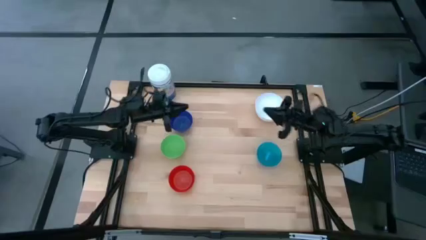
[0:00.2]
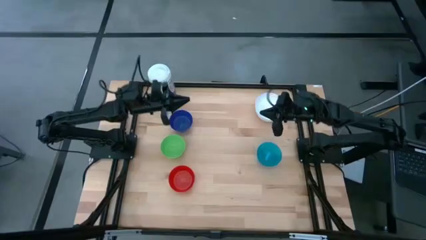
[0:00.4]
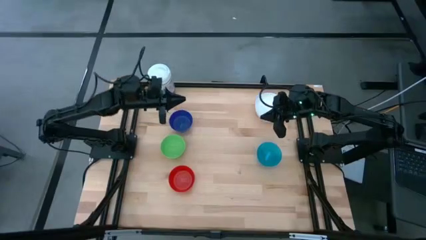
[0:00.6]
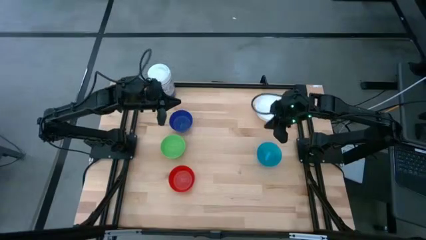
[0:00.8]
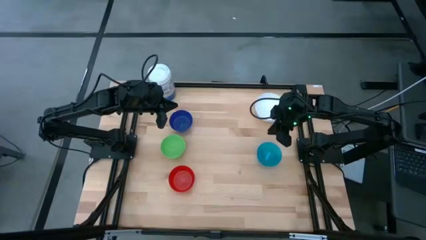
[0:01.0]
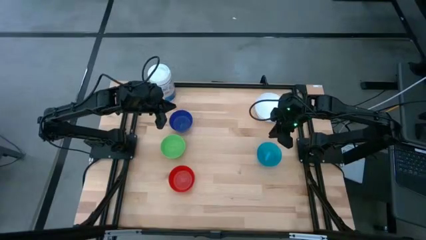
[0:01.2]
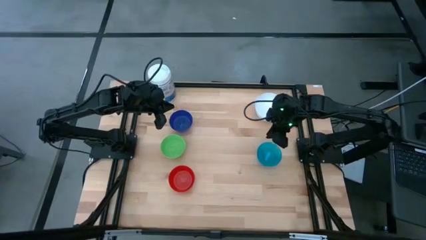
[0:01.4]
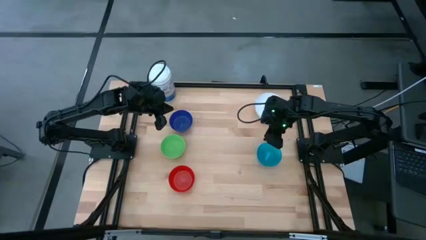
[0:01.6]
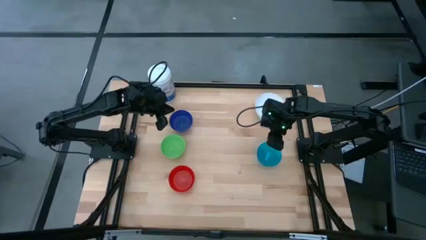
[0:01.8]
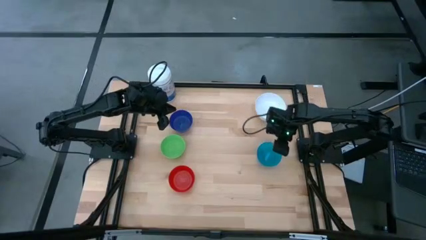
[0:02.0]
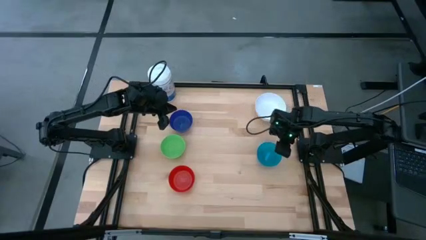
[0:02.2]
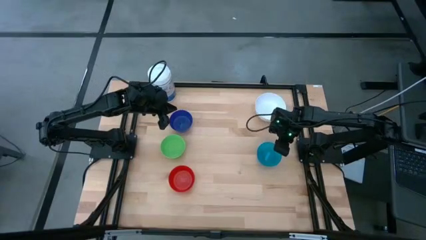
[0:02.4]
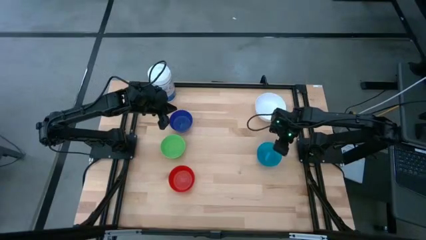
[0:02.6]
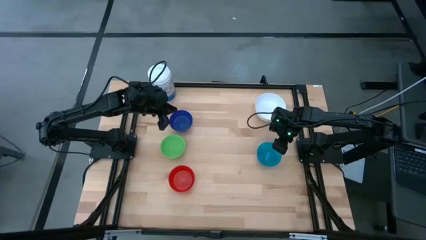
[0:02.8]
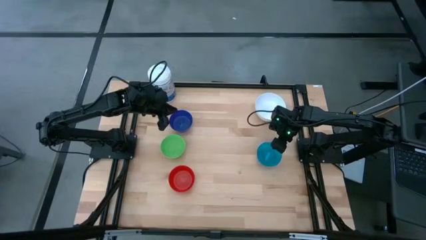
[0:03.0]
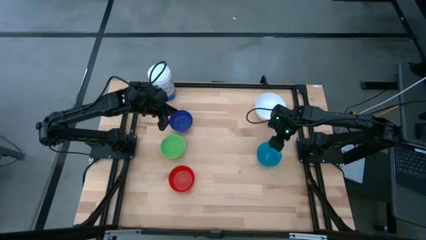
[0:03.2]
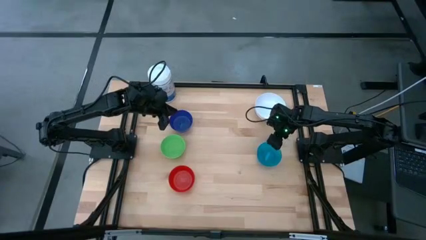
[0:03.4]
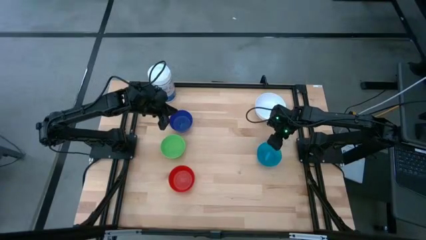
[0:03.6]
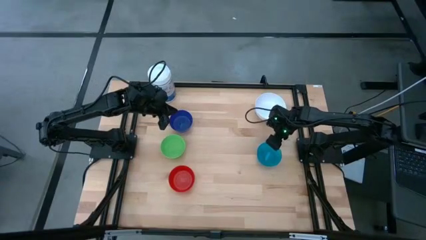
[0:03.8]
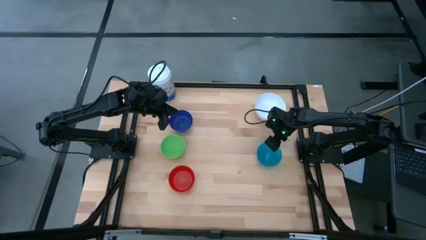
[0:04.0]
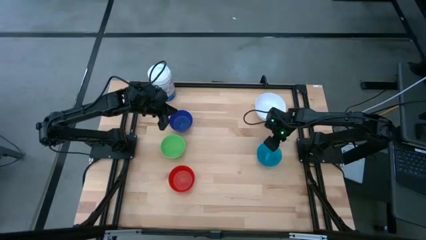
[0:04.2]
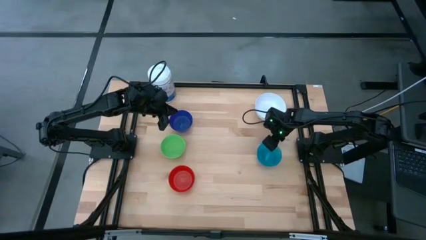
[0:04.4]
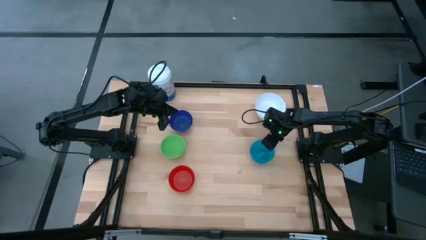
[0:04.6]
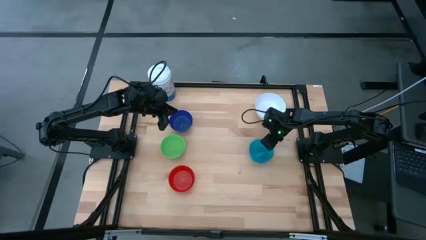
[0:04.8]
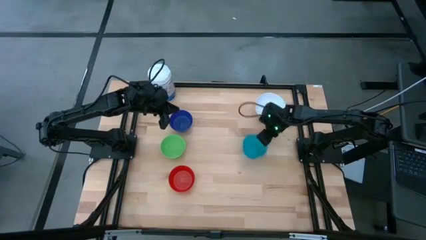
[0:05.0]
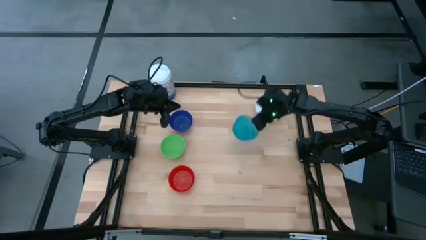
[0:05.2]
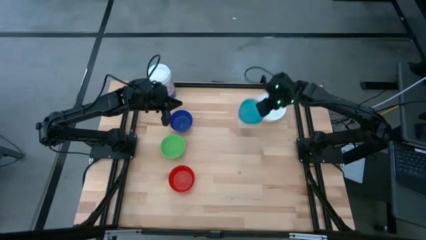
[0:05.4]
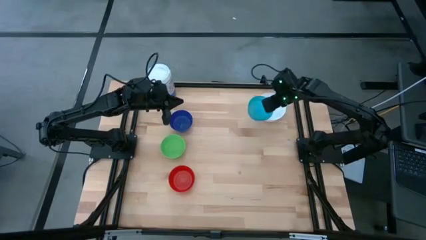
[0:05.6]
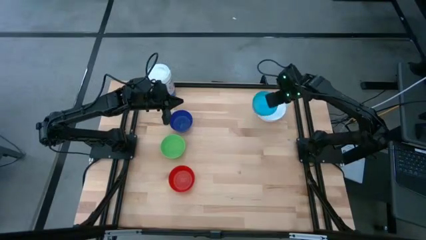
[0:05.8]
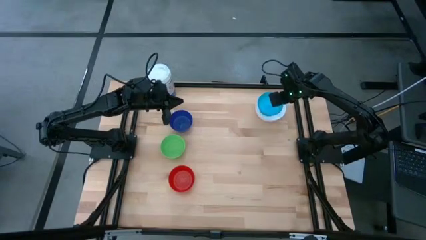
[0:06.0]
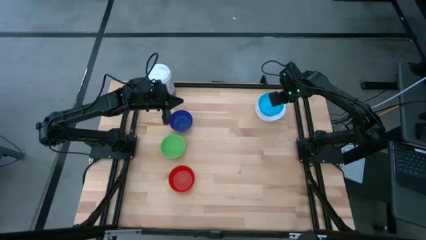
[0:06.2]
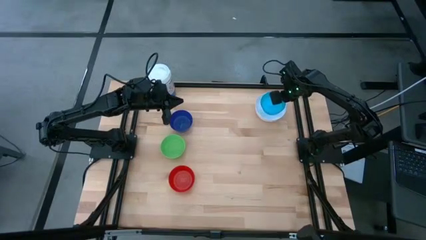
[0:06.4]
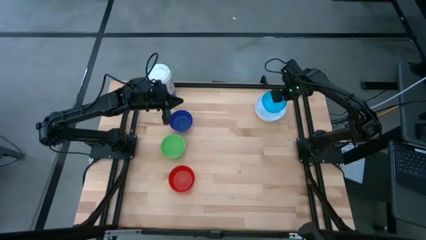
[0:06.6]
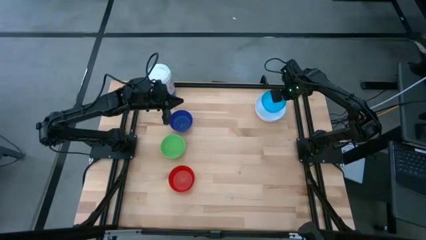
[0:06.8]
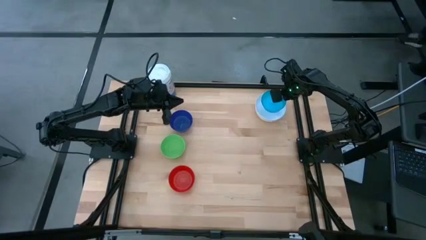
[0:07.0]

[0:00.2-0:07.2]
Stack the light blue bowl on the white bowl

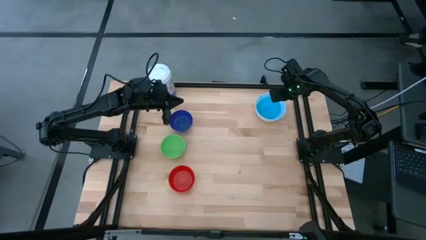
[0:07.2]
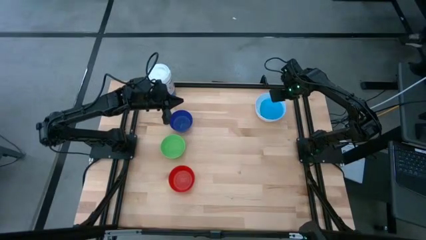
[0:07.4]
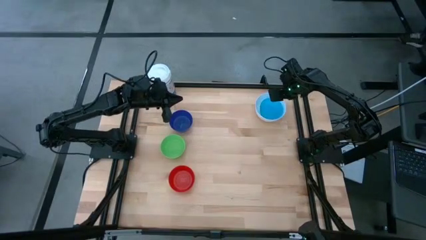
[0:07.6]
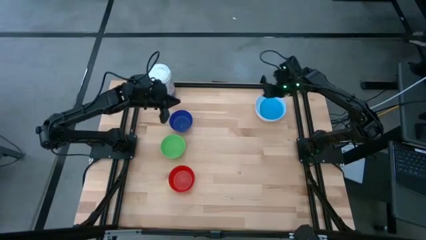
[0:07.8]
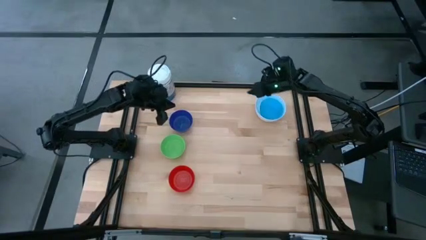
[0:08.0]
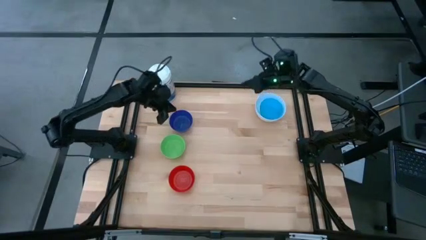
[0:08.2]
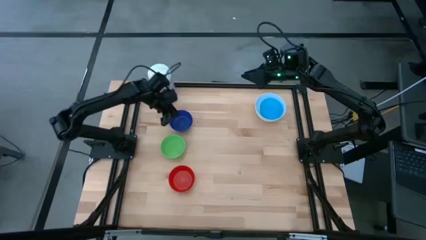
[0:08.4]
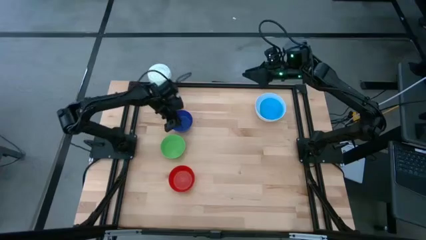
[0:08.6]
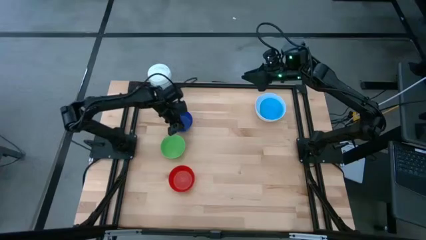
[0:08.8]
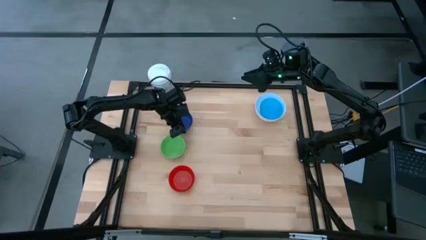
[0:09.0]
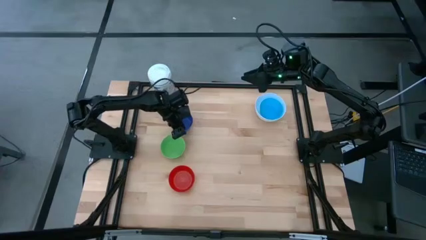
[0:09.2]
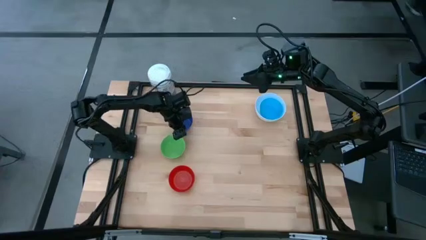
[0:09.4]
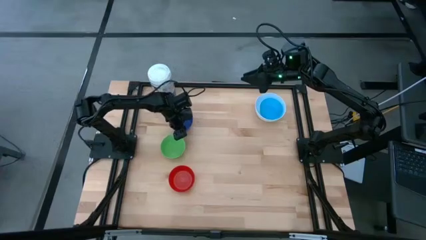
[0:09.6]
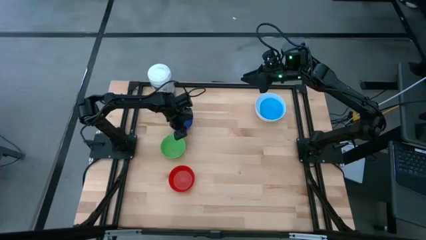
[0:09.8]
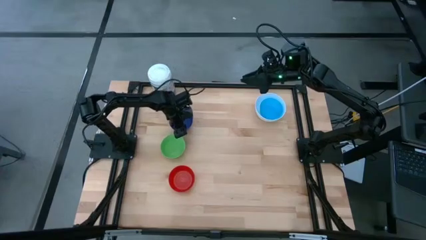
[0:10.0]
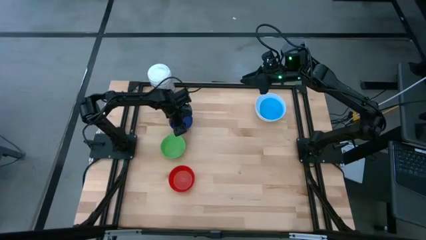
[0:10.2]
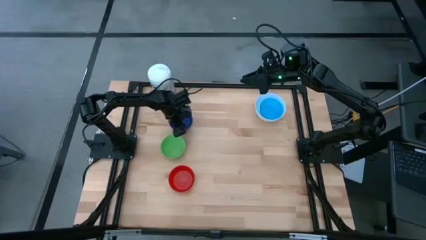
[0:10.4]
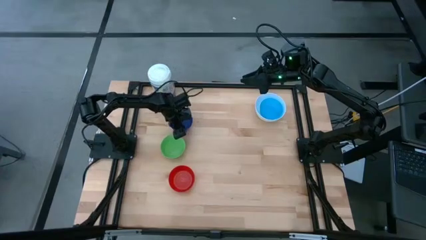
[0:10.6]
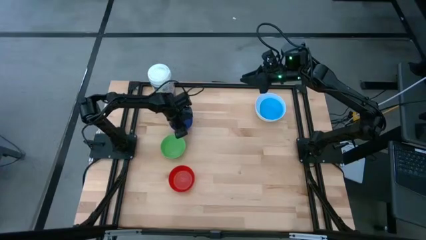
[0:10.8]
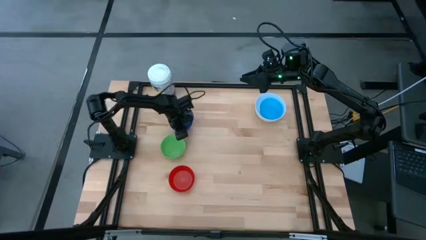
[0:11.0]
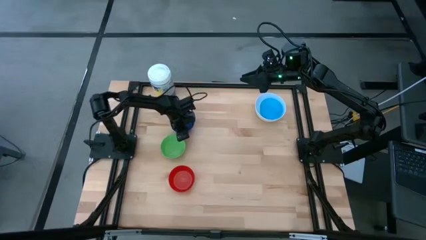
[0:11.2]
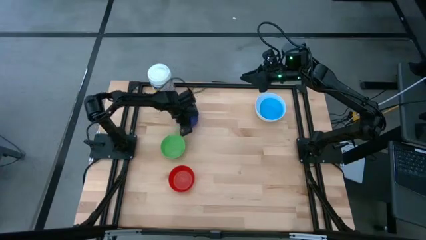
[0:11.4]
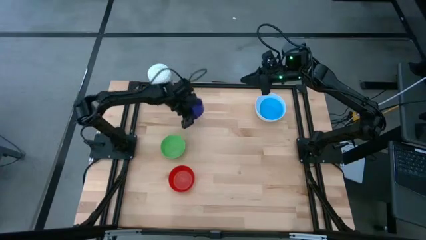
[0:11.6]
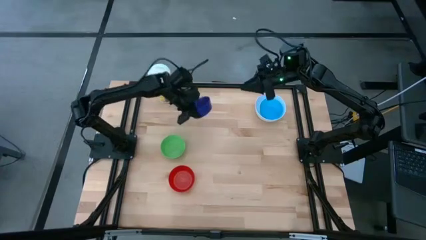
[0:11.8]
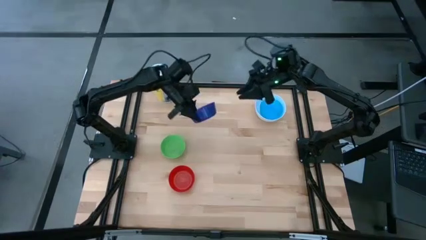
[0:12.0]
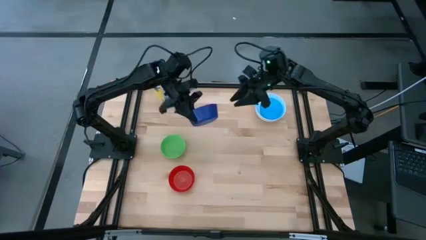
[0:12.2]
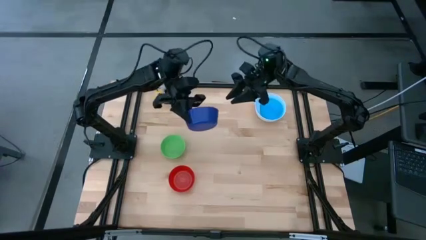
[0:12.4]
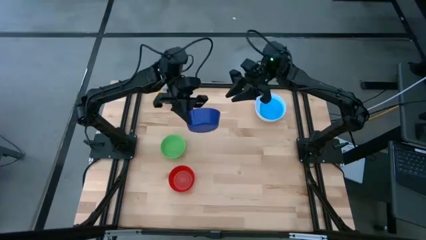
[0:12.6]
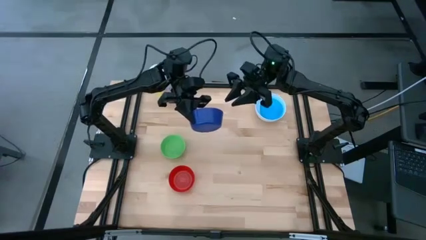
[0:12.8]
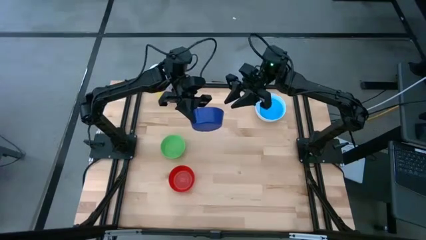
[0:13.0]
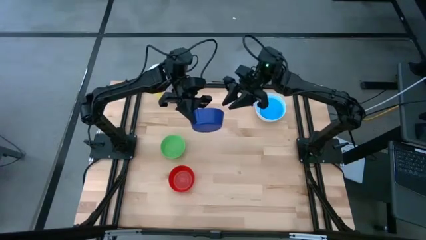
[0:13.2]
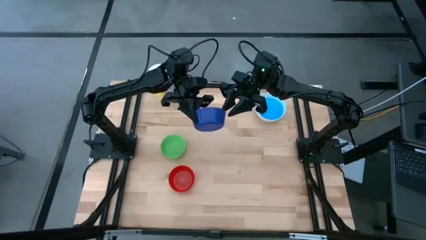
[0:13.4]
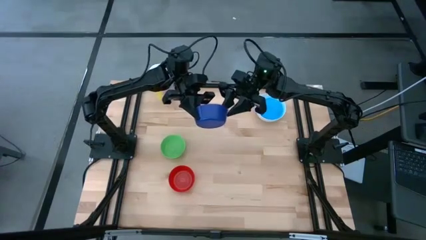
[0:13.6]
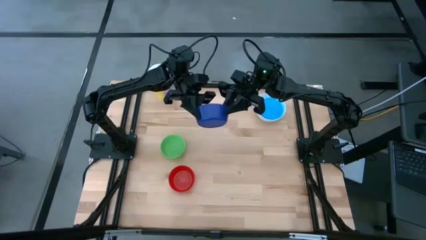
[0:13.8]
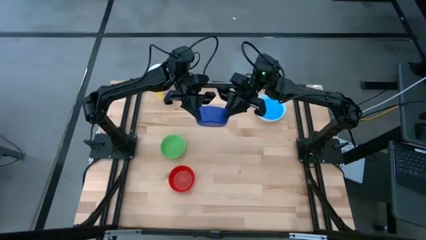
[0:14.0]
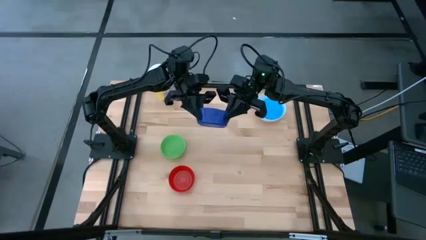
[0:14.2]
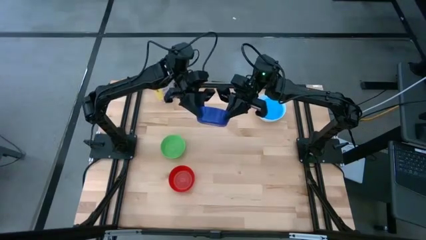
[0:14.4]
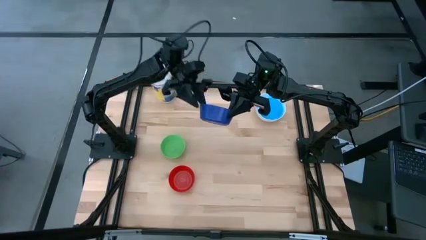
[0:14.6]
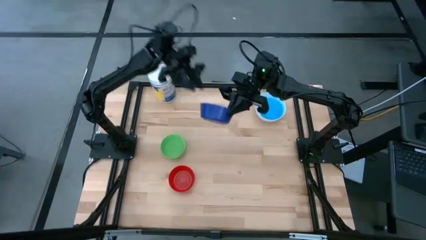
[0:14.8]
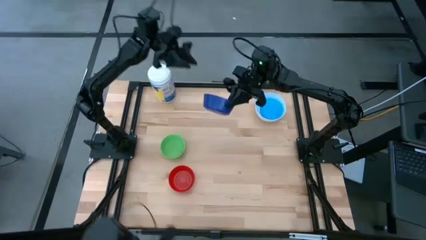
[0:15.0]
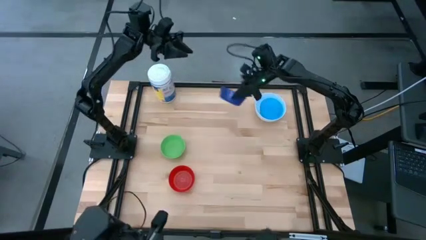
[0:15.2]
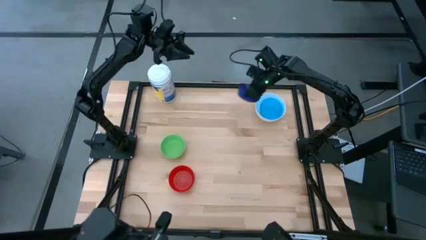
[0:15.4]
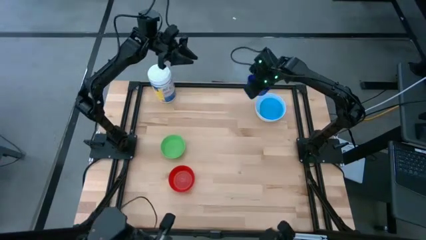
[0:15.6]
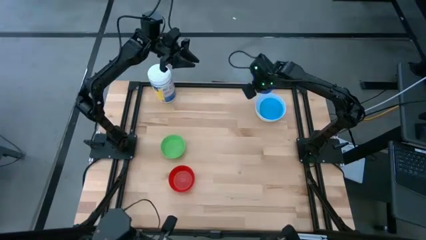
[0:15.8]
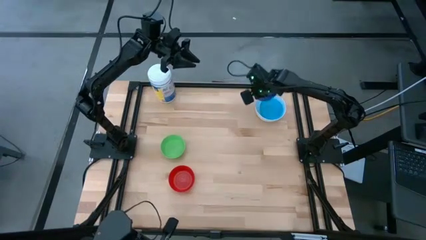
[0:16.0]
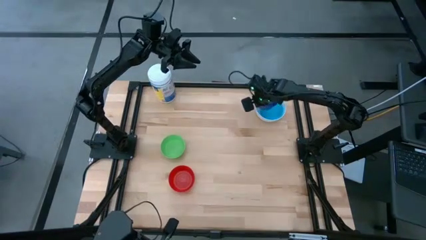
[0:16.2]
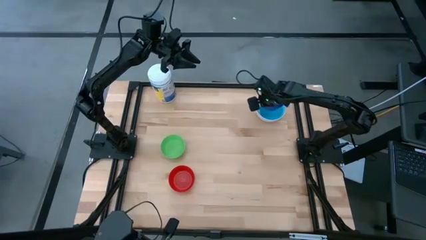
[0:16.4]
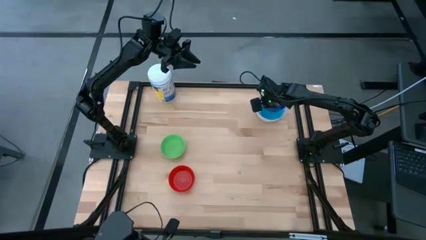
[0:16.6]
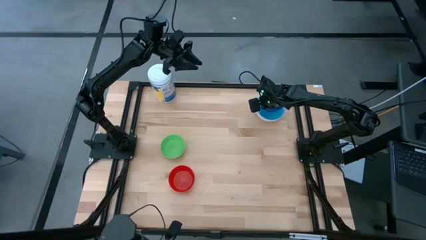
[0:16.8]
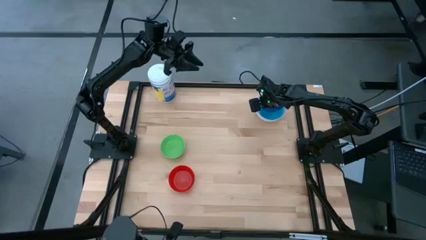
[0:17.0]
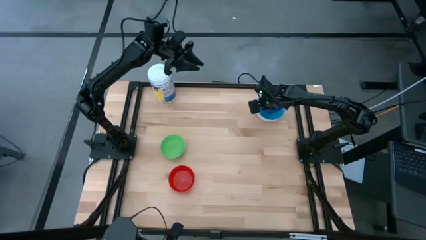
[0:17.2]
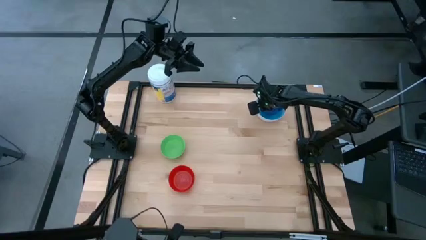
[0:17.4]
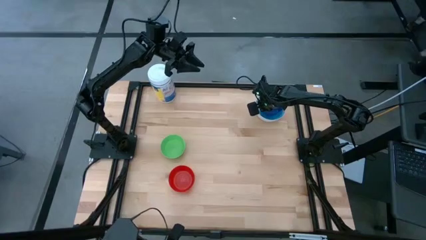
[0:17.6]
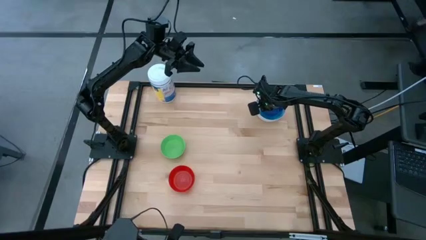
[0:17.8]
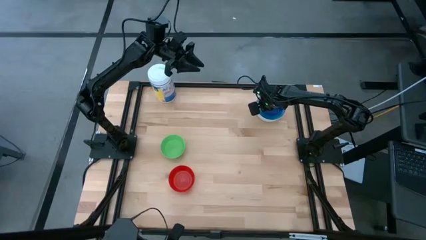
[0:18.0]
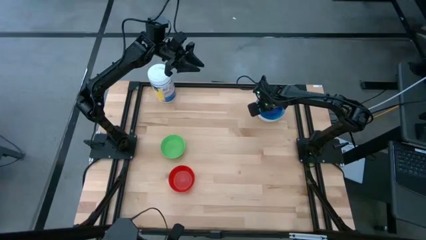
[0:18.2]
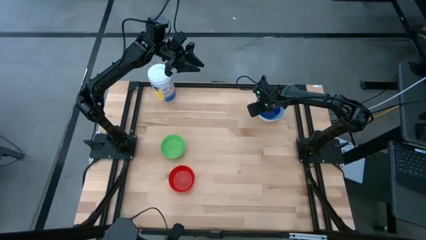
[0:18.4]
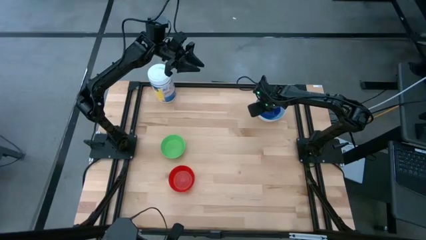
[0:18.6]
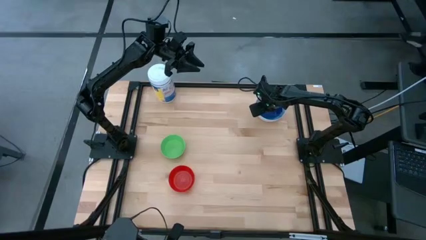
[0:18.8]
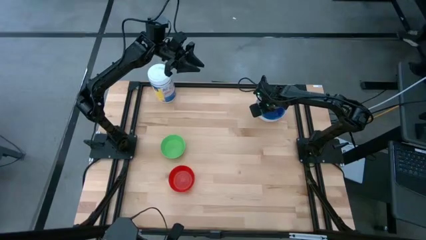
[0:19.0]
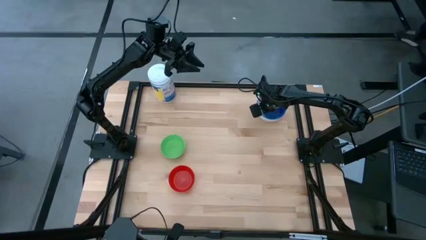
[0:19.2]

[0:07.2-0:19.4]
Stack the blue bowl on the light blue bowl
